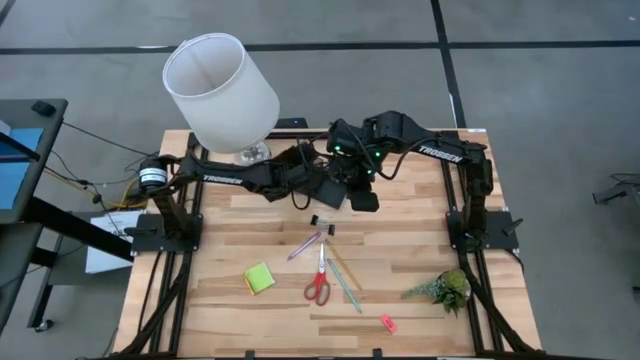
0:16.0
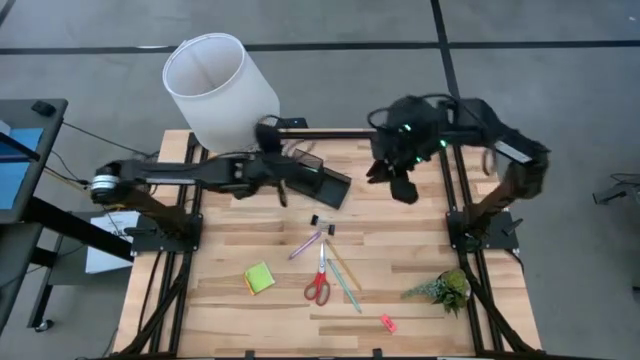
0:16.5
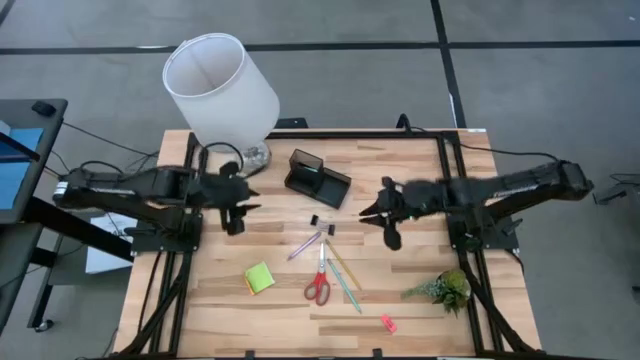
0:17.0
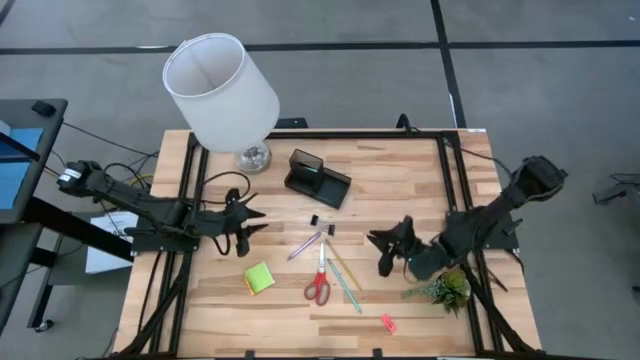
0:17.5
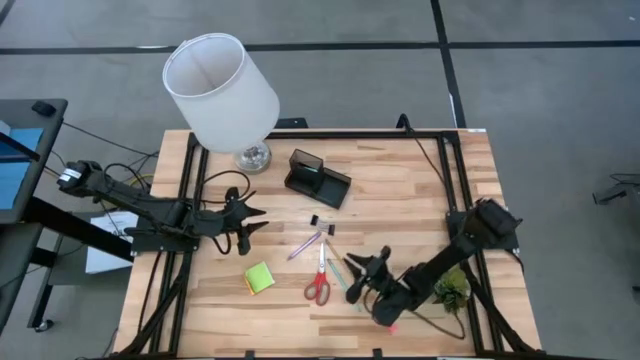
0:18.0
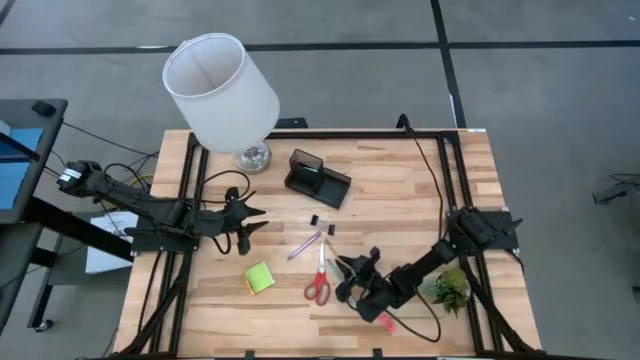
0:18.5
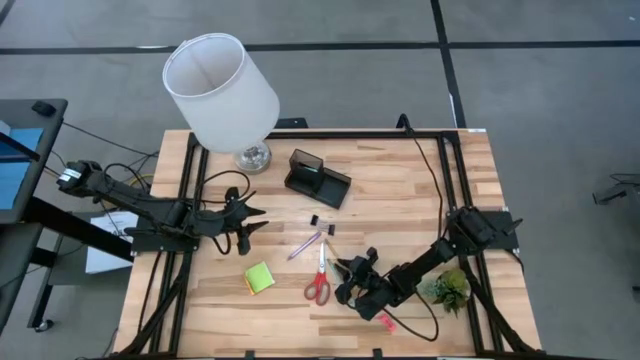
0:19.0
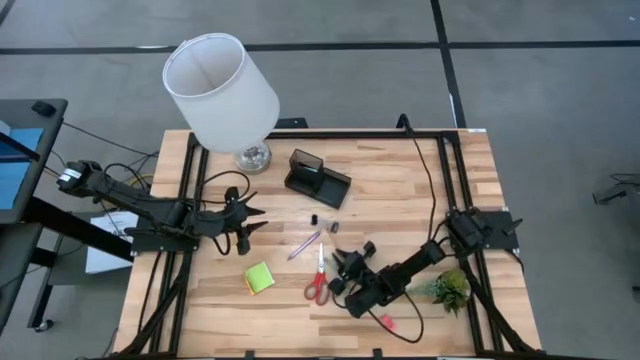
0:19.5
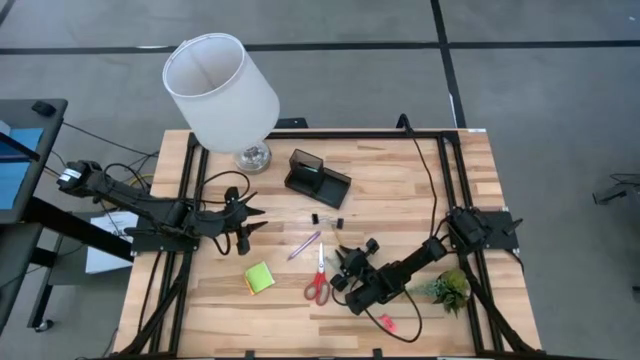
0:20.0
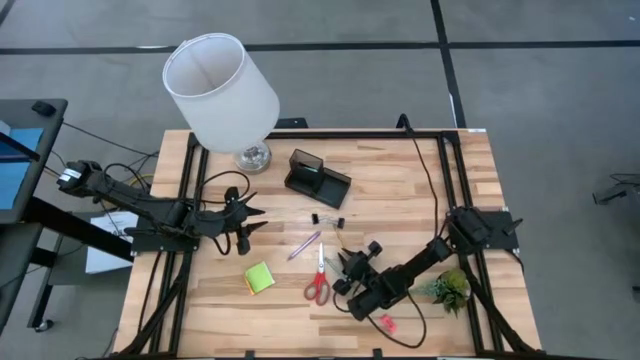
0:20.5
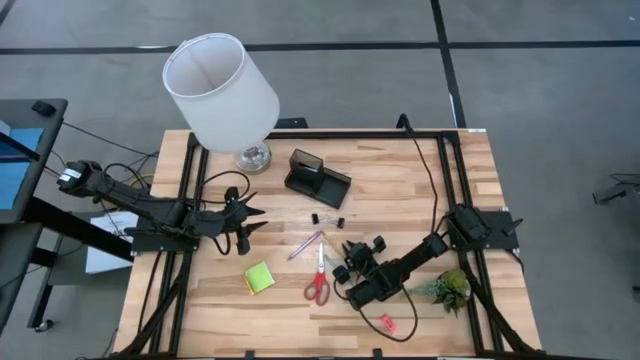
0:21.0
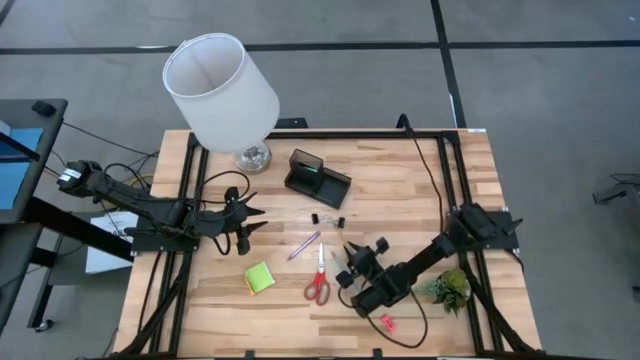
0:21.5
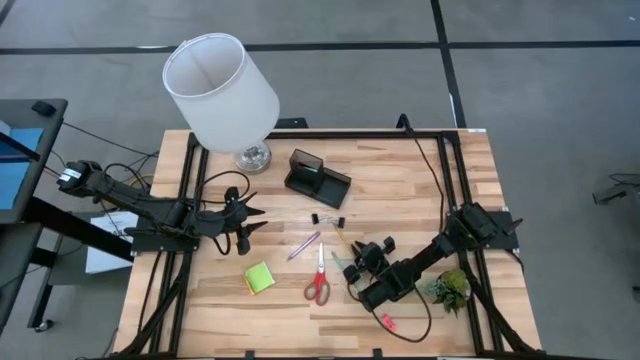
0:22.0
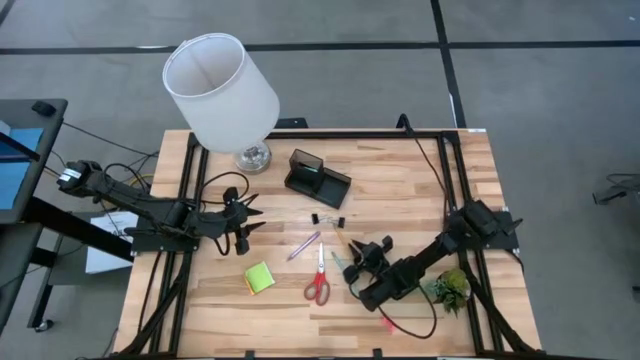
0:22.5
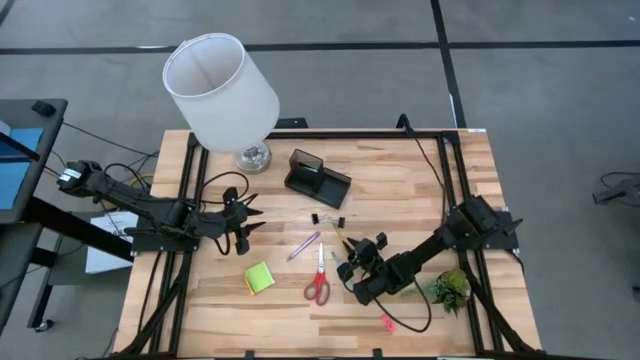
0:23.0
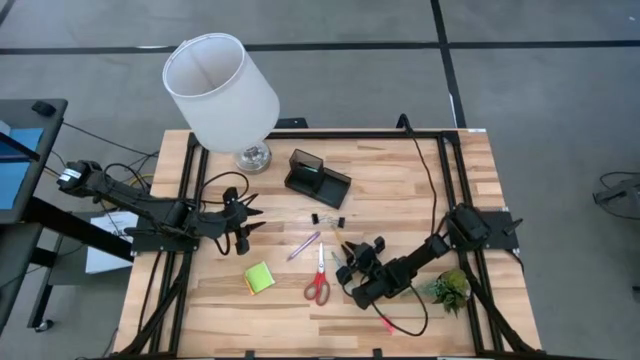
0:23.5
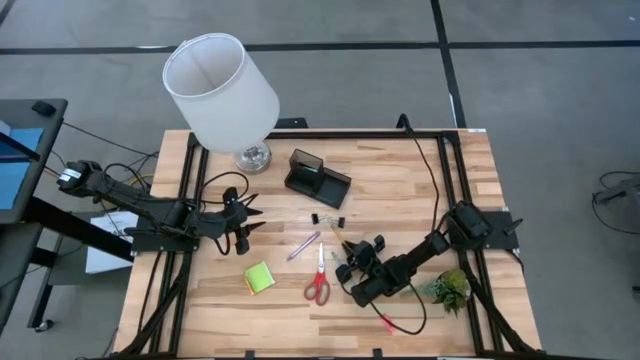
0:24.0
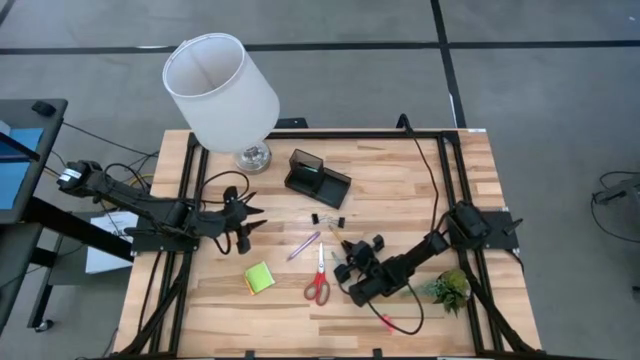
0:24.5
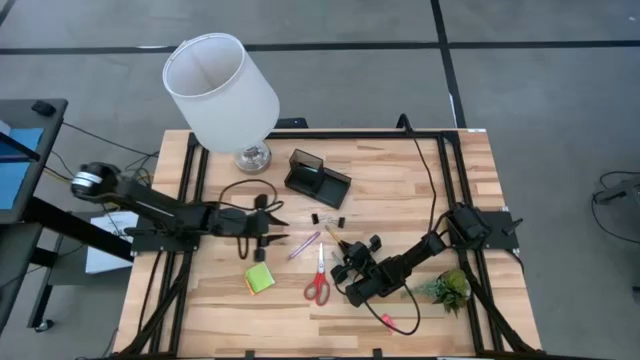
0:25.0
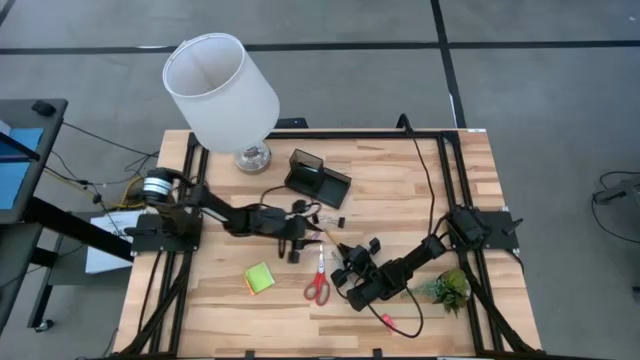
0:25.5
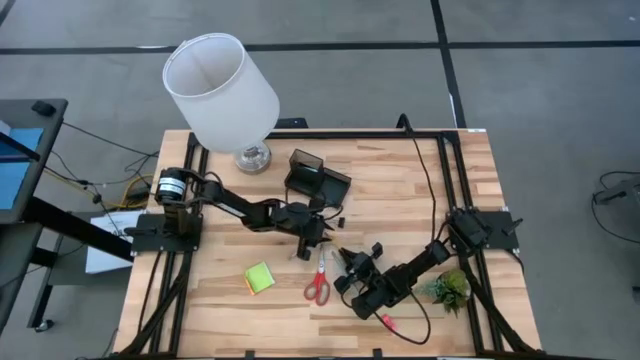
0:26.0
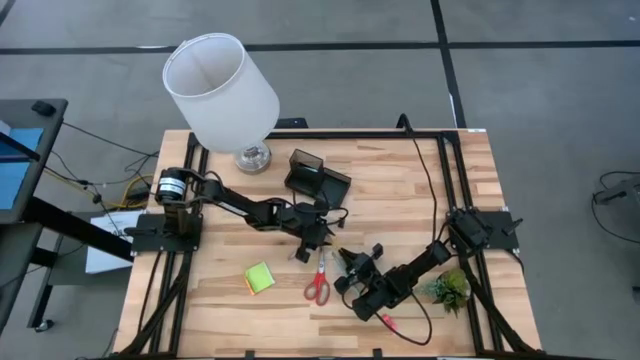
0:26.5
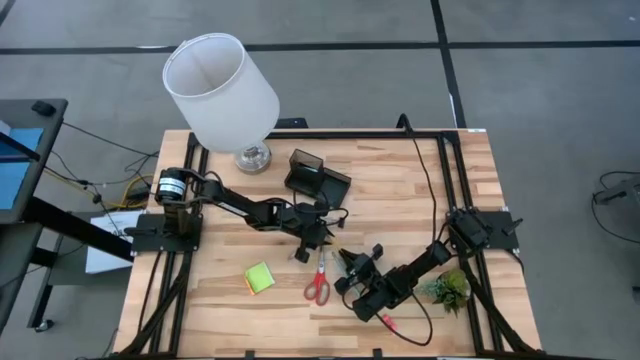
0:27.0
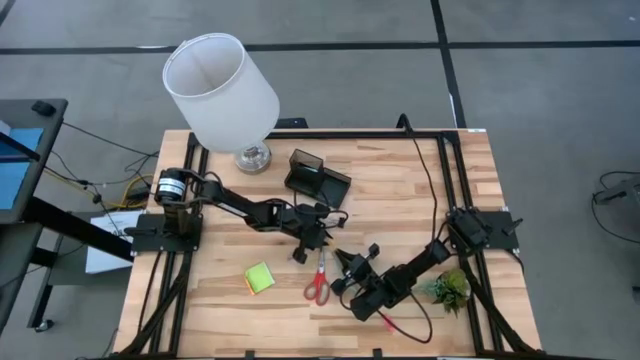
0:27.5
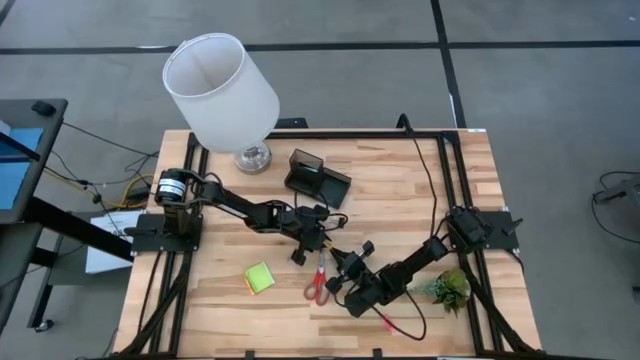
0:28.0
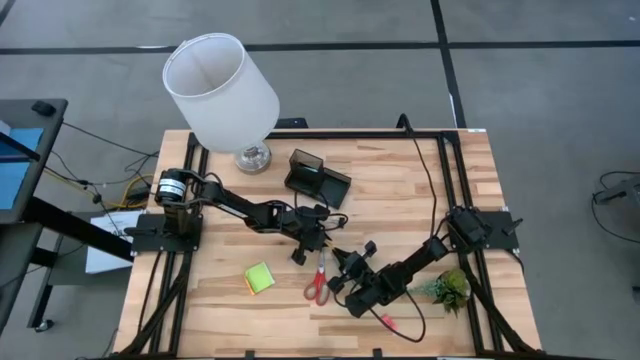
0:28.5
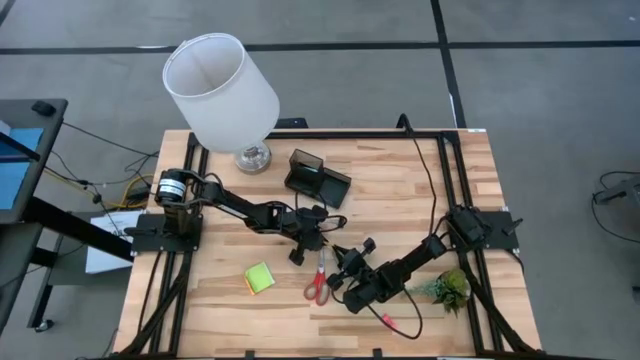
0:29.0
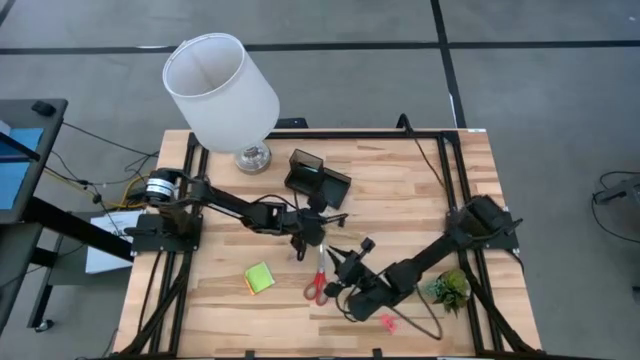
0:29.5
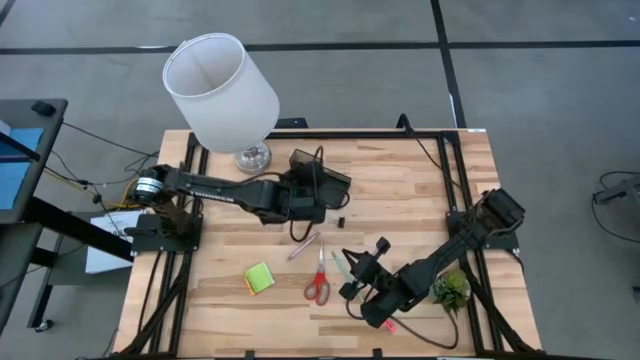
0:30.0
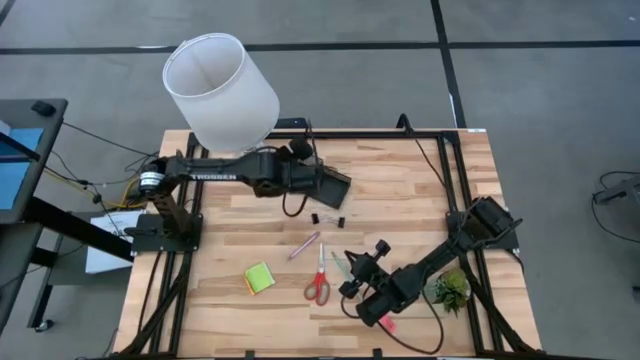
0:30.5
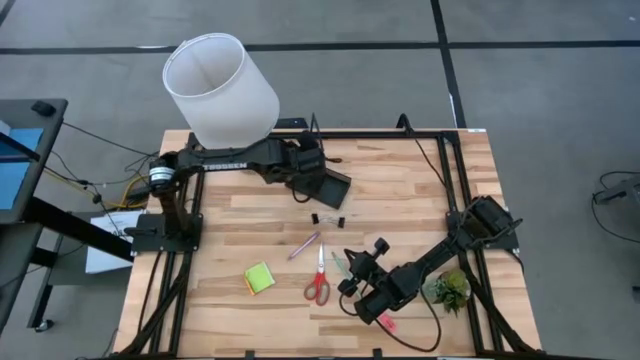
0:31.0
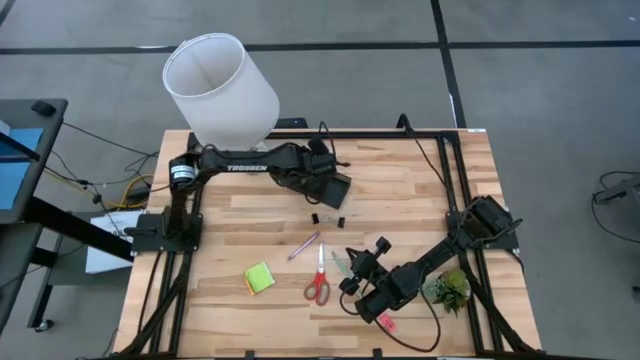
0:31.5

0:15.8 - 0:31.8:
Task: Pick and place office supplies into organizer
Put the yellow pencil into the black desk organizer

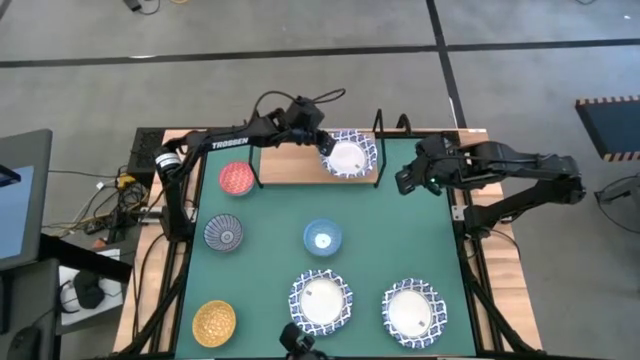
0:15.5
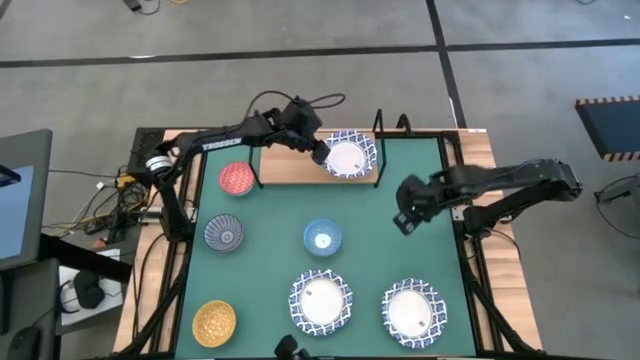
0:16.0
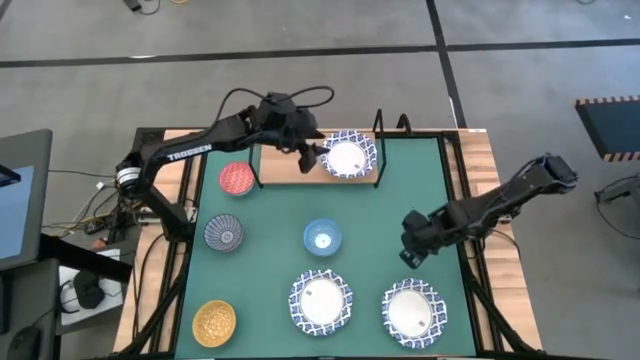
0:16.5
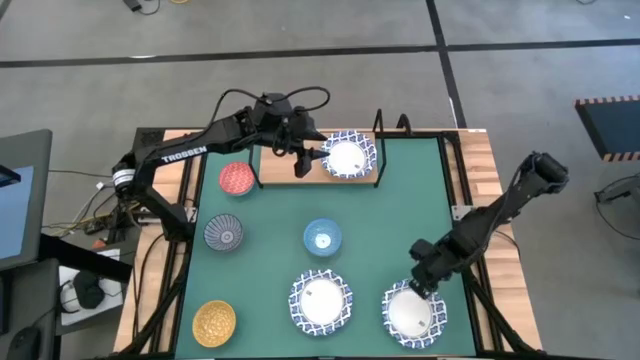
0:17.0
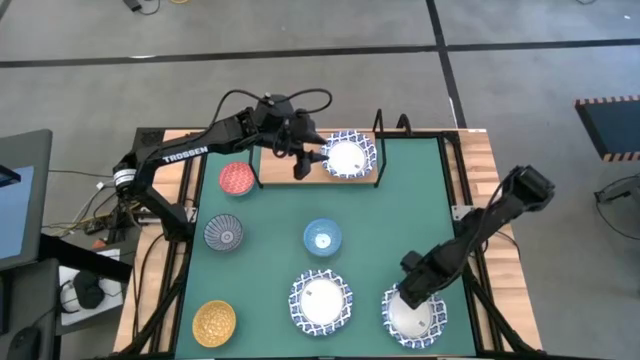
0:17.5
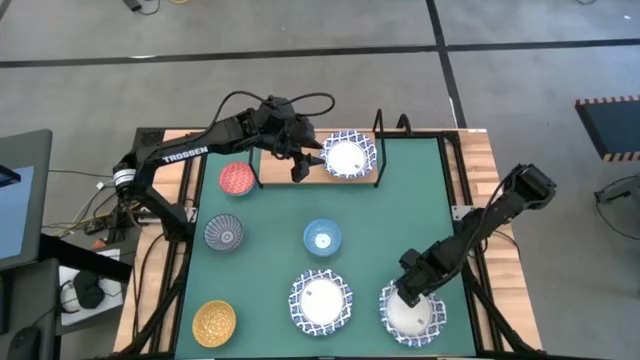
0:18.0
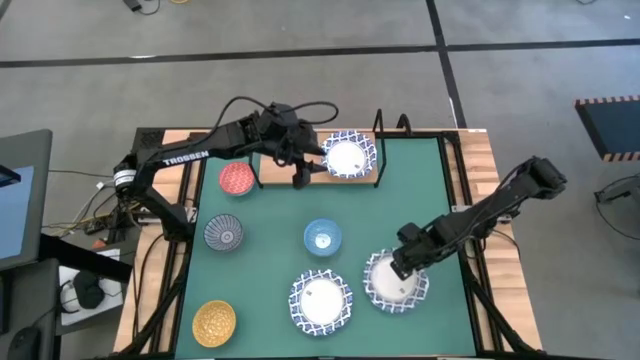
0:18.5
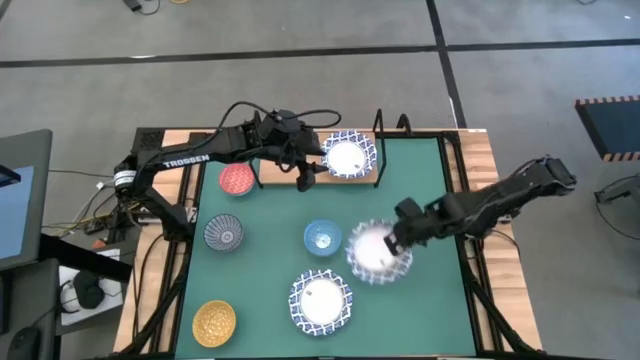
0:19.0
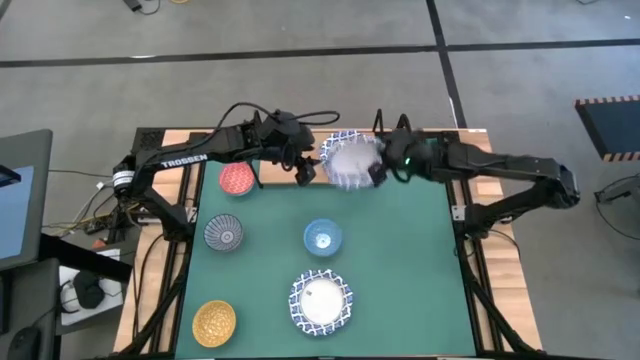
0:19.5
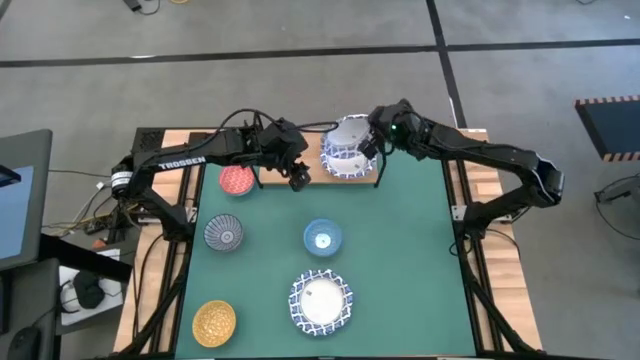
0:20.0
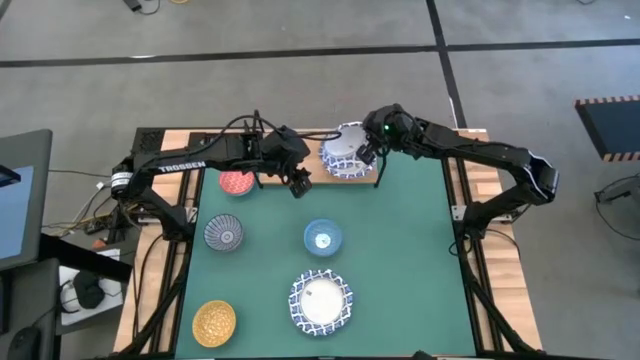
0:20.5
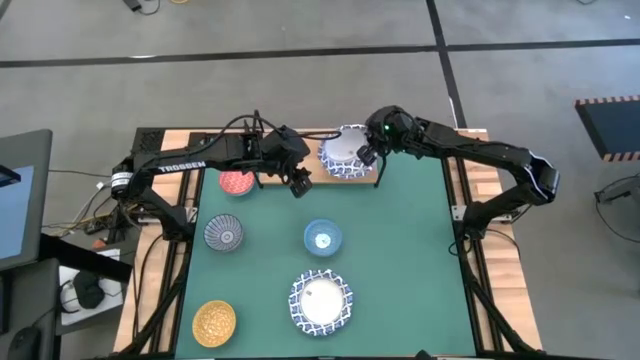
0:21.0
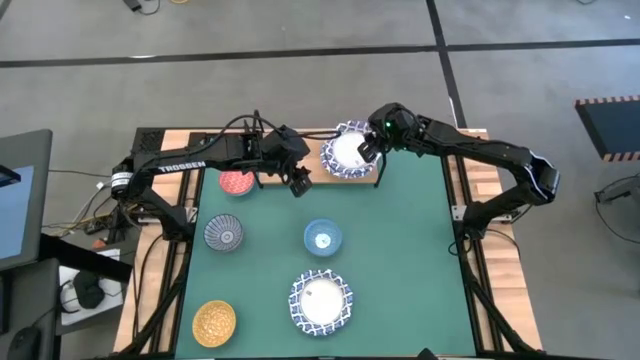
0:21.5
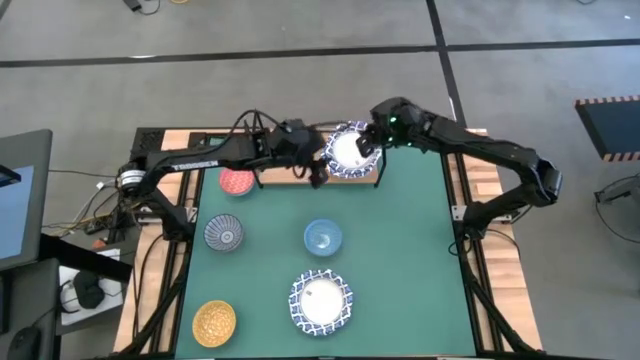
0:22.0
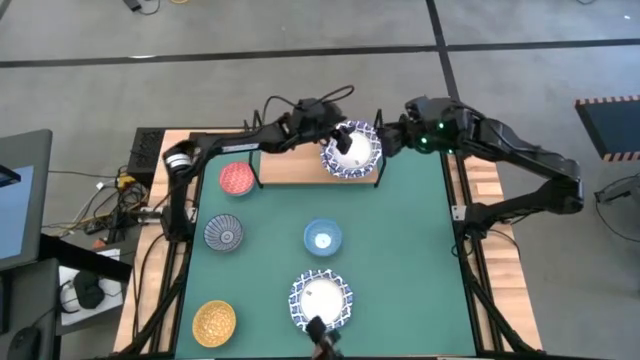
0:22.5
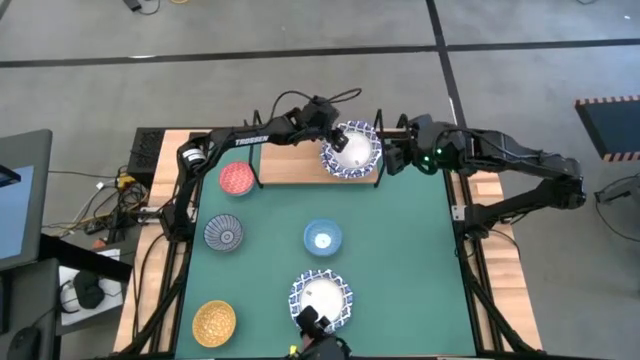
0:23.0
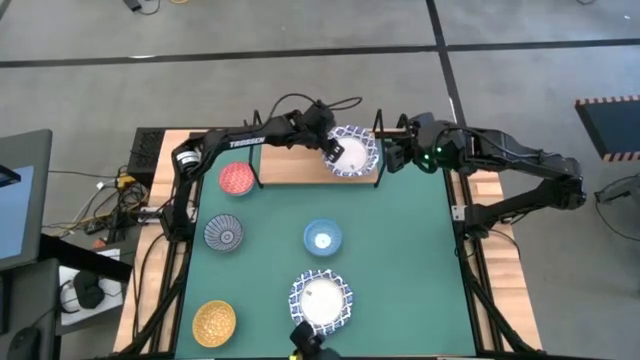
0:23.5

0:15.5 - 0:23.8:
Task: Place and stack bowls onto a shelf
Stack the right white patterned bowl on top of the other white patterned bowl on the shelf
